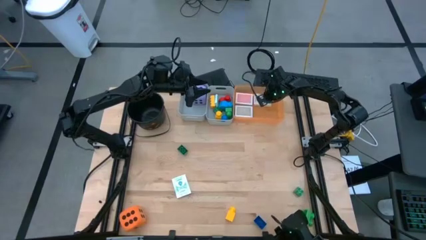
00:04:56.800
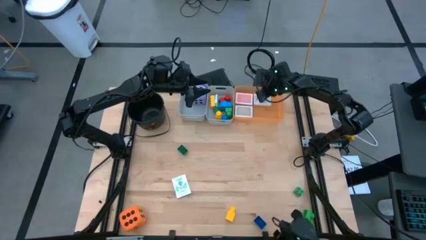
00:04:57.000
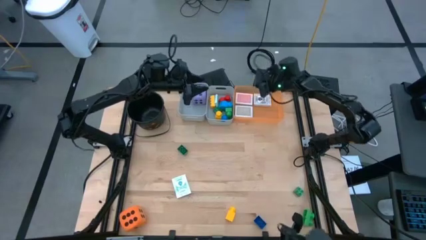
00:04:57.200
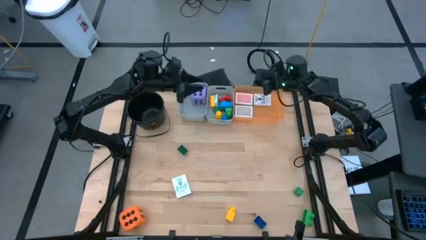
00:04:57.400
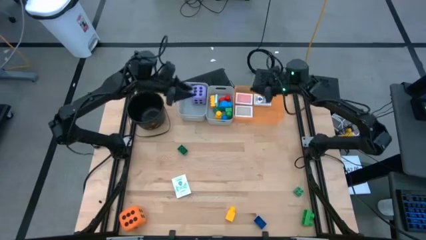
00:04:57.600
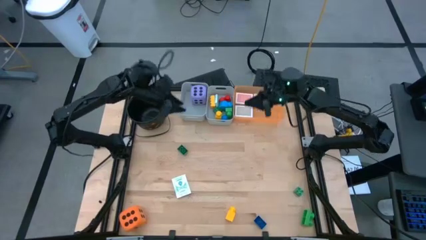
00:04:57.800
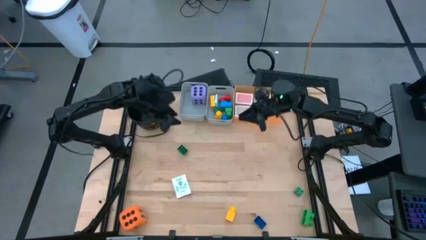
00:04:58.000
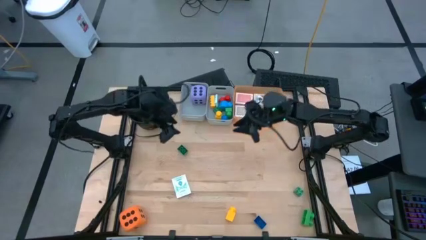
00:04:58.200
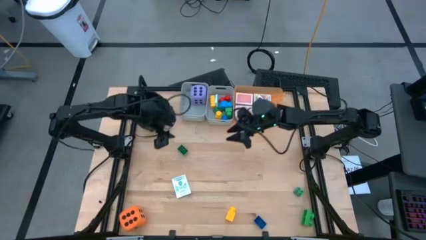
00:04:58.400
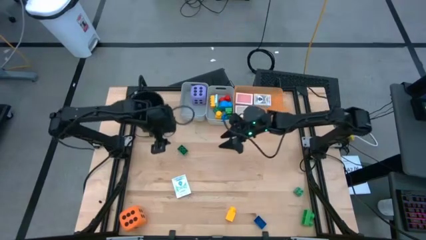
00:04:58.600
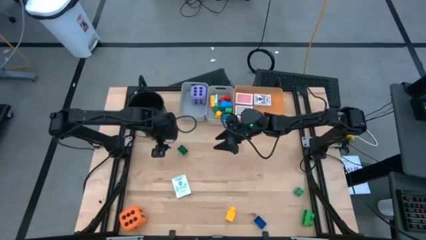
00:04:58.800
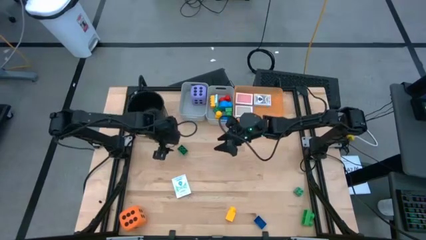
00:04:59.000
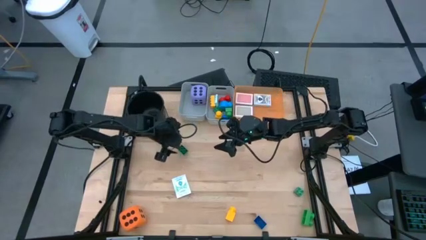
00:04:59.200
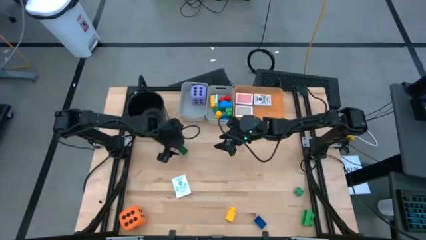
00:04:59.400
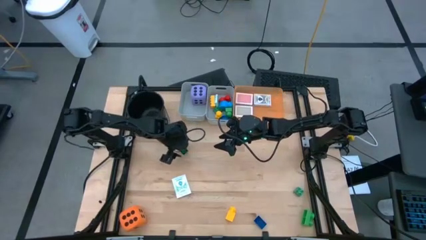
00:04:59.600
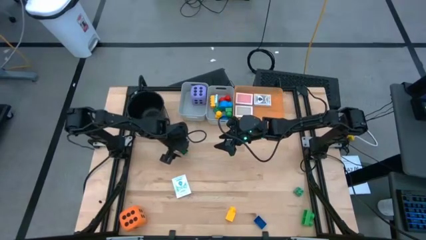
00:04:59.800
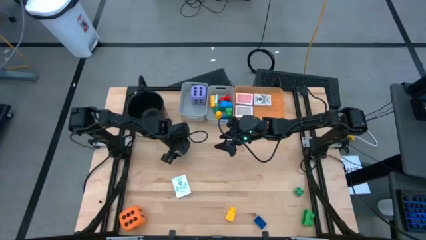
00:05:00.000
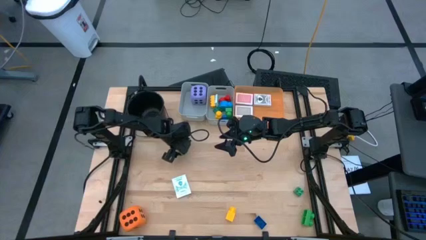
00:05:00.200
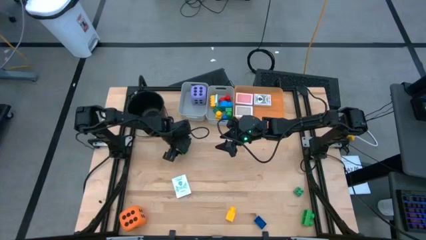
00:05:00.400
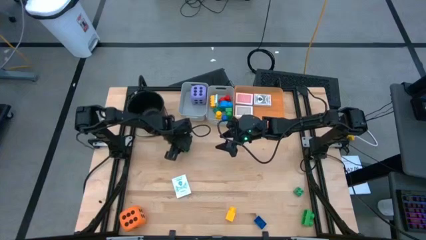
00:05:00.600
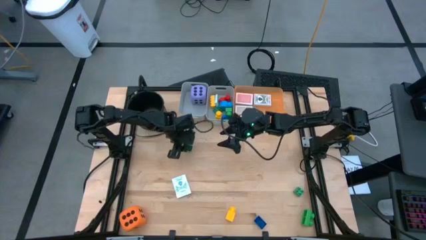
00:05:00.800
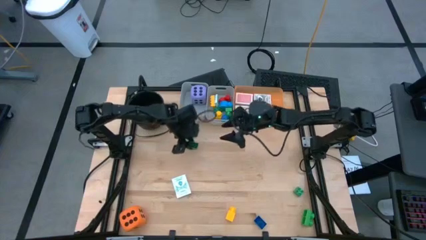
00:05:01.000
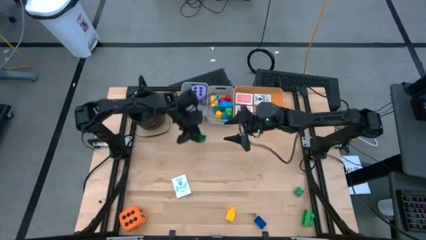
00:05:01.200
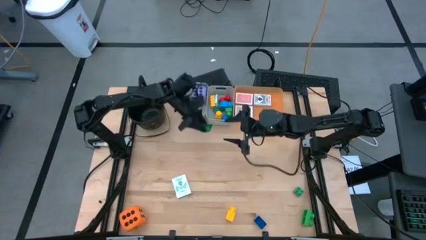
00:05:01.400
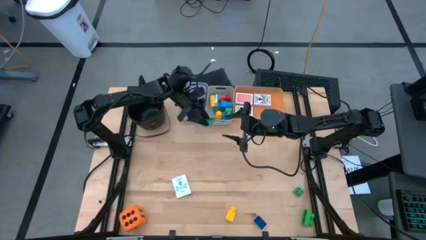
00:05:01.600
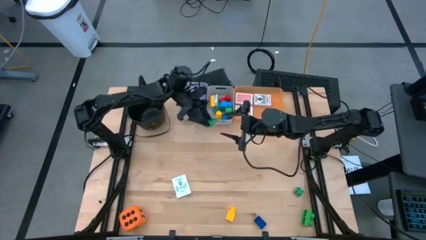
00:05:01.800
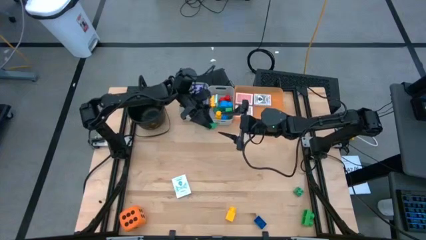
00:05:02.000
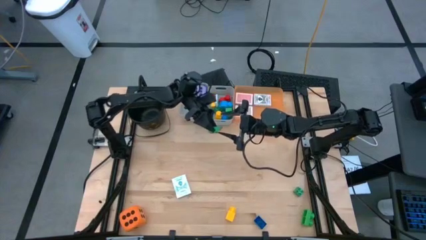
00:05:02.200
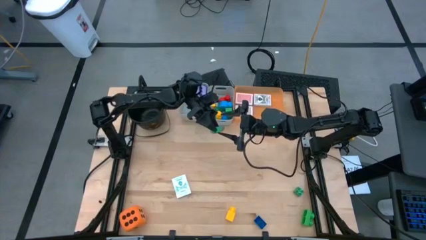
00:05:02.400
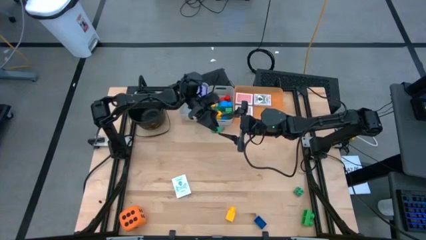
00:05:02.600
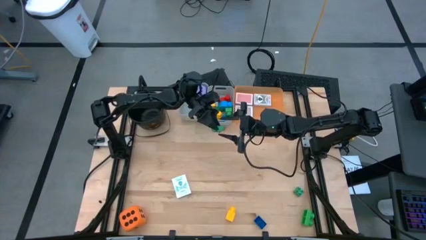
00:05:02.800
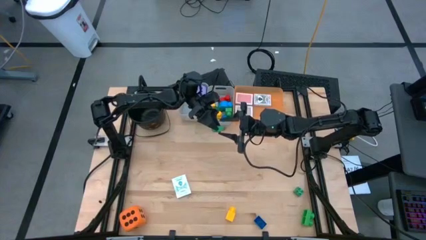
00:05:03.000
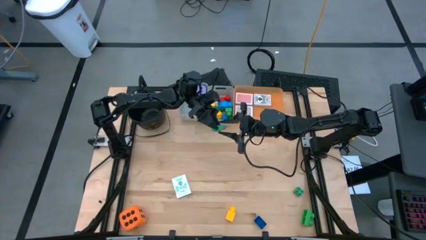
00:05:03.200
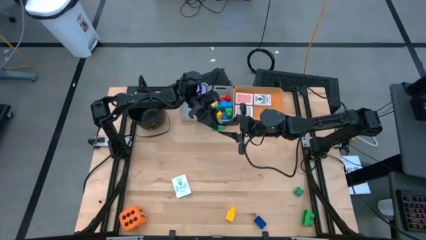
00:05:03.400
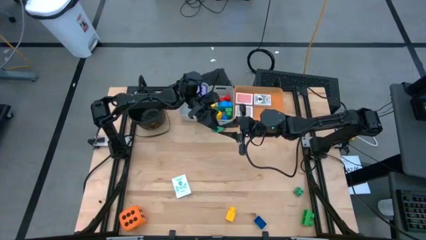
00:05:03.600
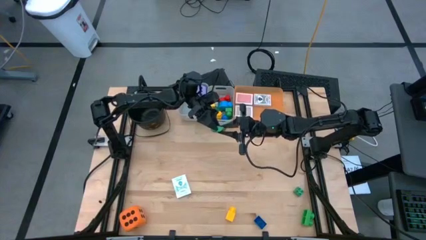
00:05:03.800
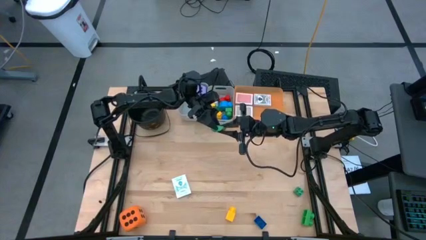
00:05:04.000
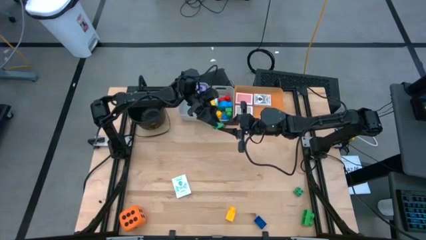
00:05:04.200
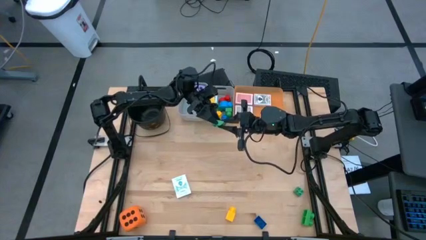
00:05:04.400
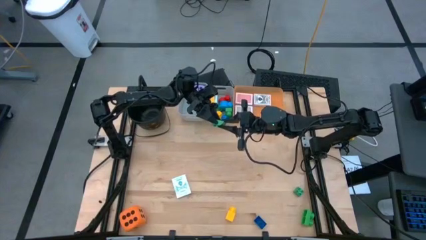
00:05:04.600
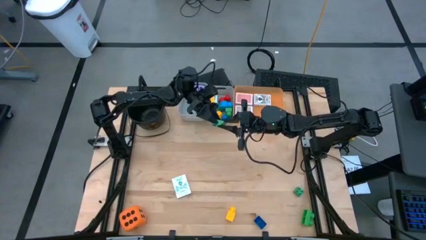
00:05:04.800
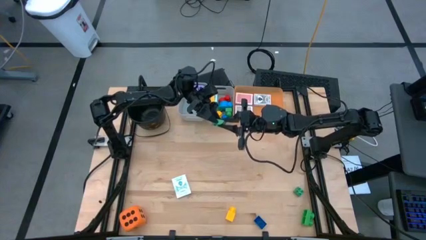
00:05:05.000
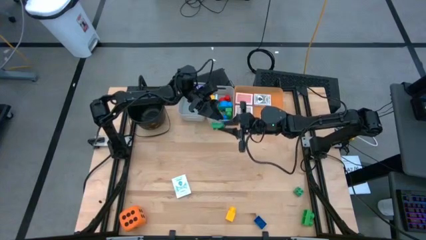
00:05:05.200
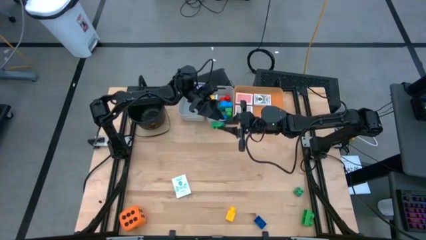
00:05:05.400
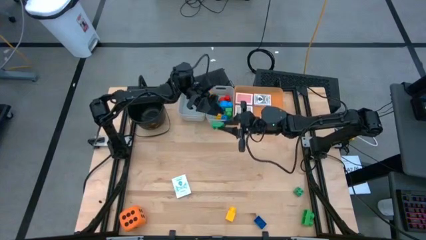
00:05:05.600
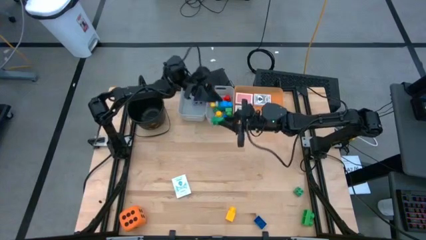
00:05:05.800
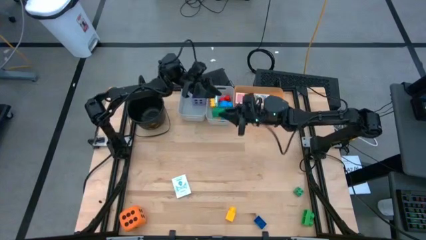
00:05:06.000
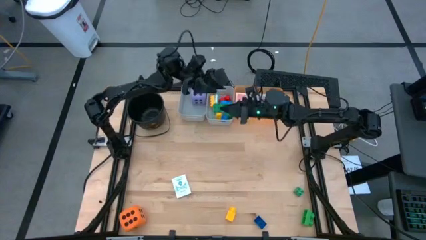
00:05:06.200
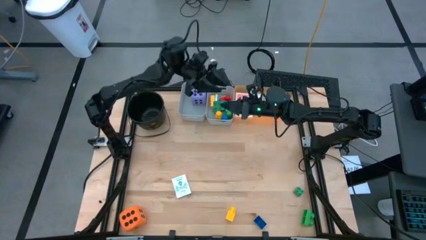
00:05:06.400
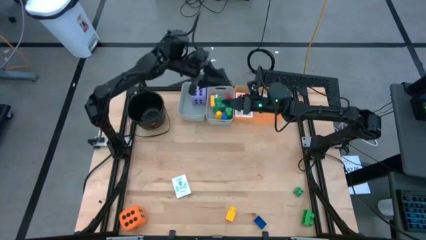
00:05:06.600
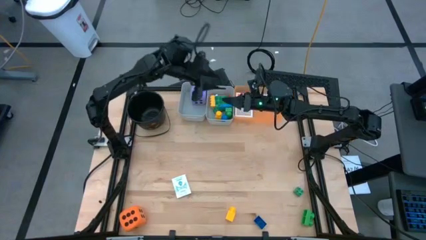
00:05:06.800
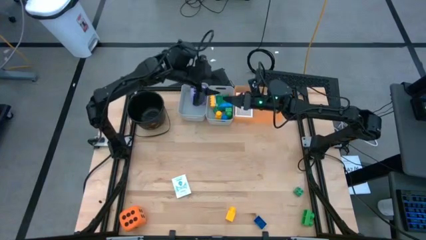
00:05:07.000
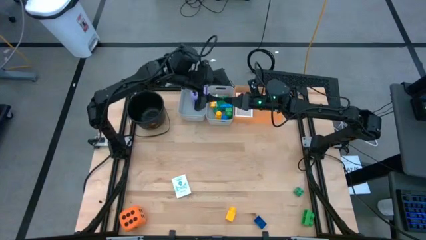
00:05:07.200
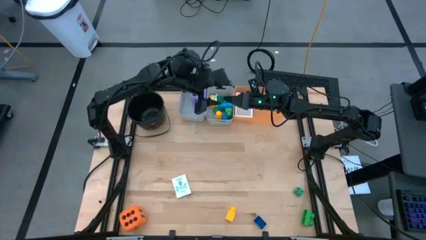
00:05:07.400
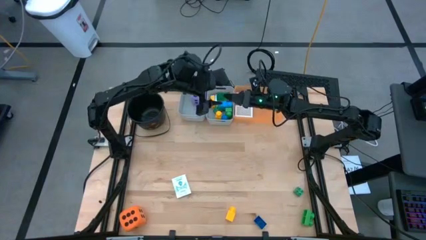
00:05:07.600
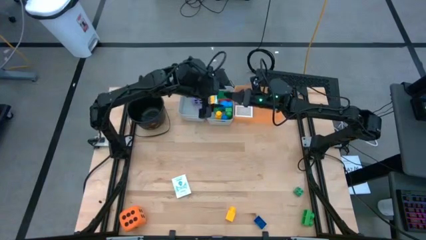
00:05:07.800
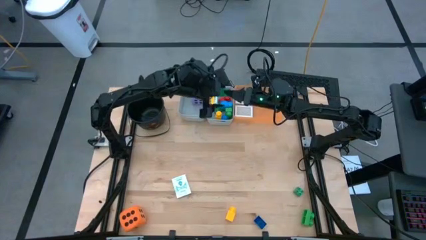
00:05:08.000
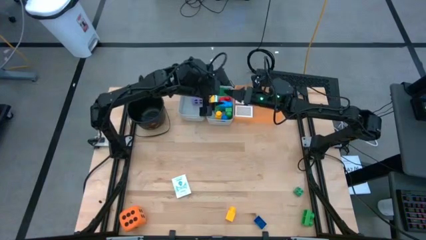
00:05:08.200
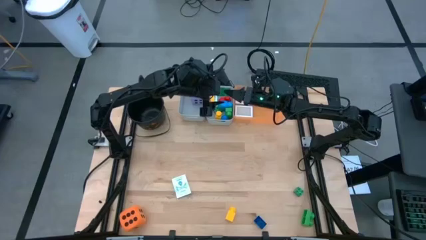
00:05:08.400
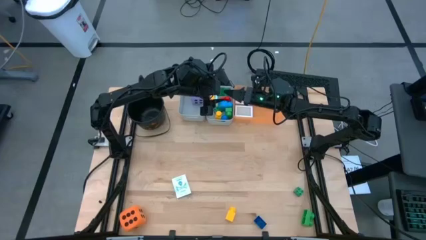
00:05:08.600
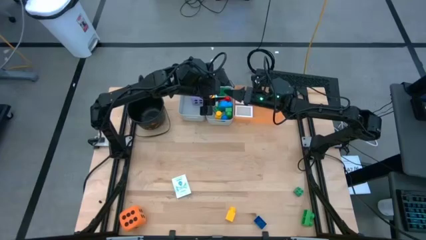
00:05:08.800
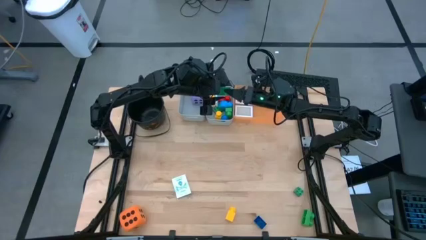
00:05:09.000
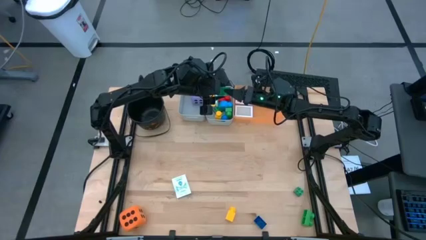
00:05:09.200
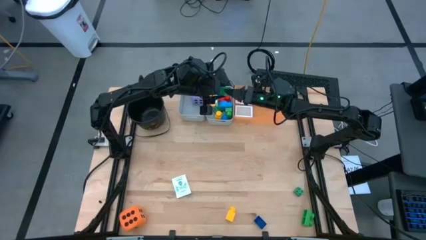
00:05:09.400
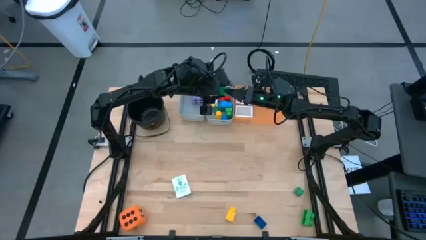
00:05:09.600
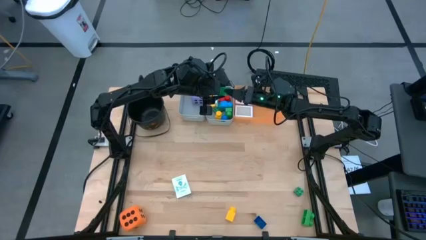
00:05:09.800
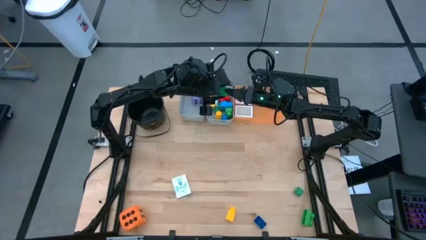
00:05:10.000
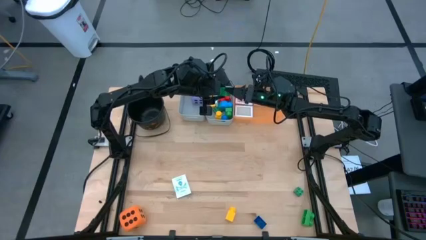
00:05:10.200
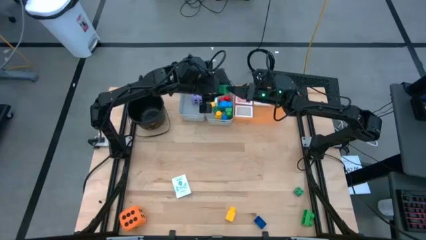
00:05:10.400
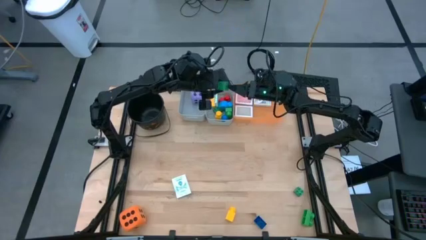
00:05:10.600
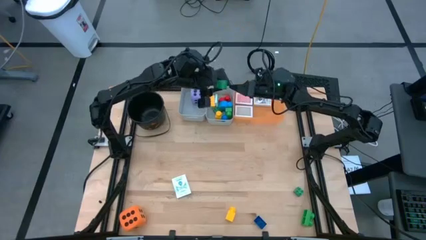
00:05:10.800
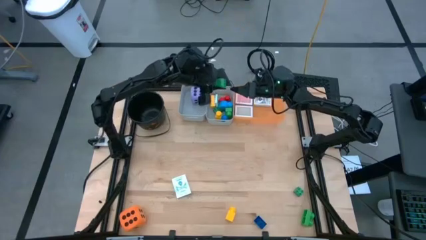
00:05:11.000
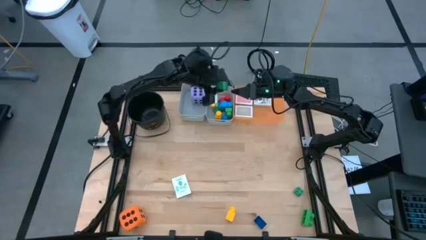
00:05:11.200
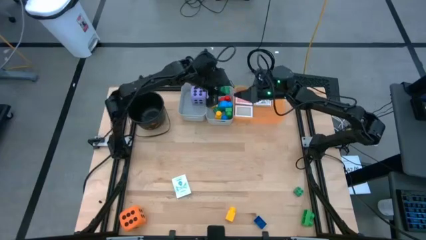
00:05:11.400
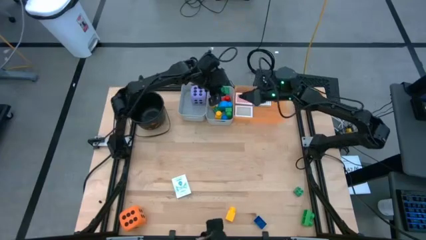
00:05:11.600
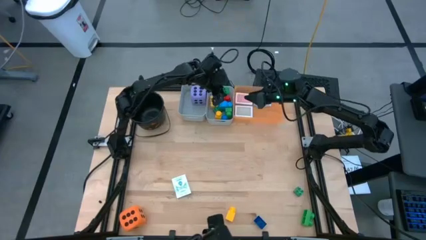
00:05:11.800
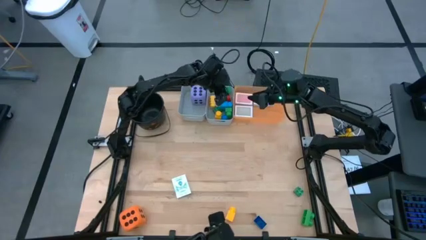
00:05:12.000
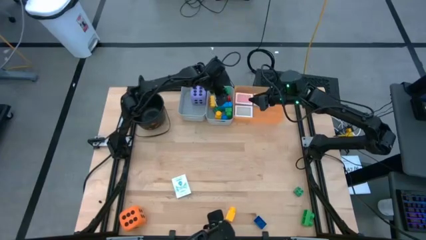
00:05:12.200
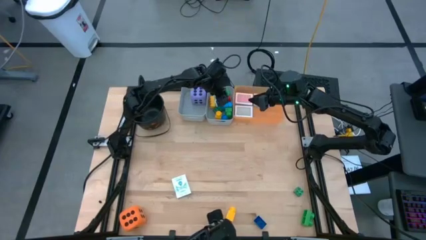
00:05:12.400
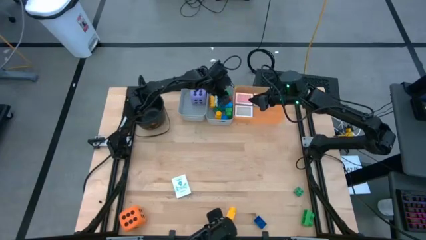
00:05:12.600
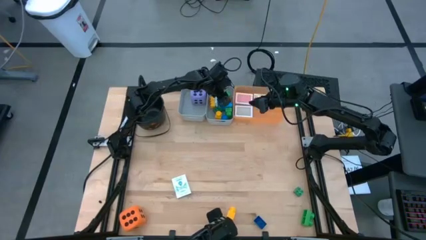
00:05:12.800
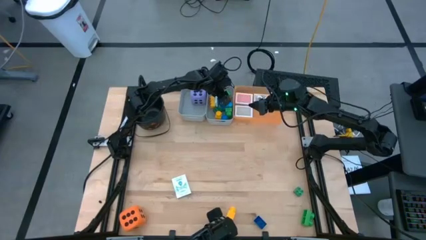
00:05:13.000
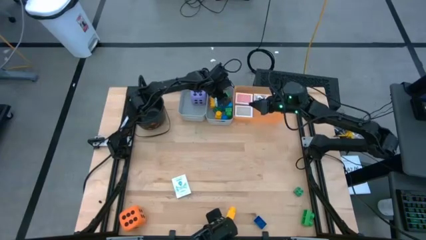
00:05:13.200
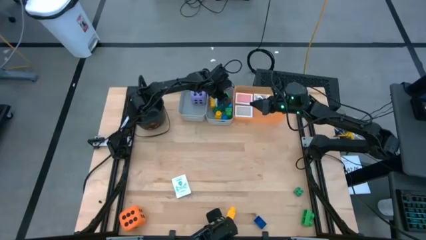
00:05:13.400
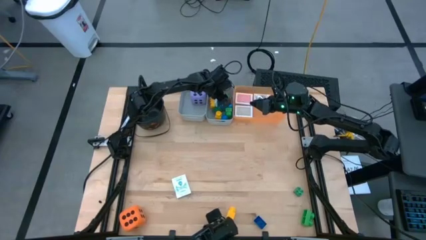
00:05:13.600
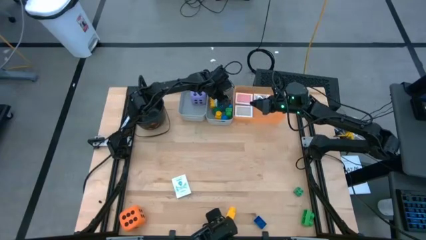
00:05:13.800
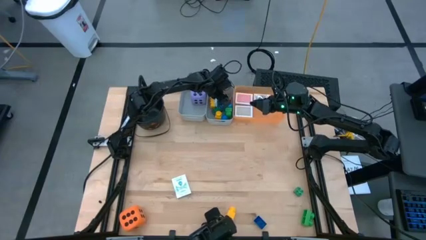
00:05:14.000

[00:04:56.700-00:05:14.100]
Task: Pick & Place Toys
Put the green gamepiece into the right gray bin
